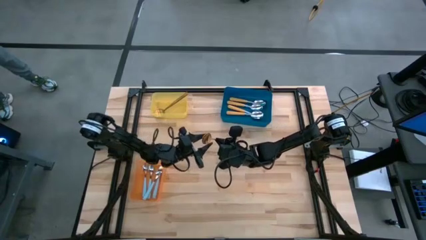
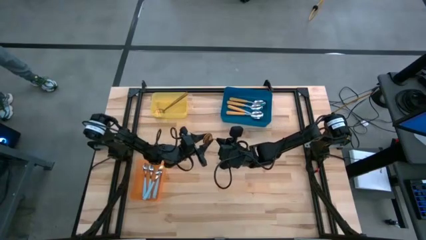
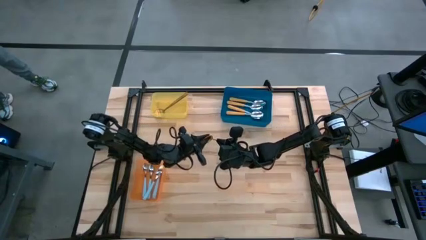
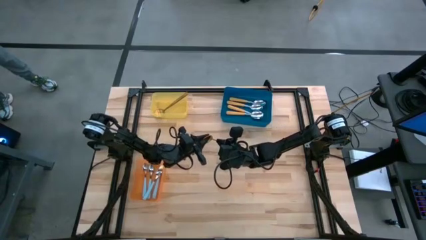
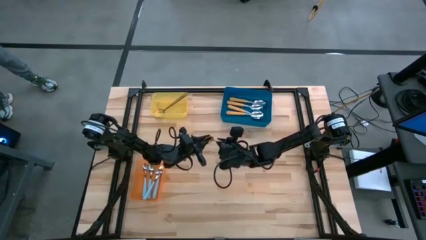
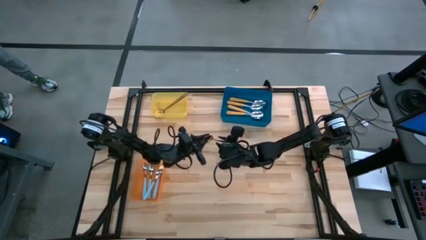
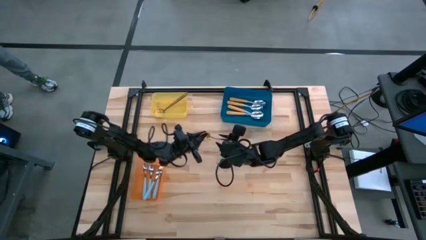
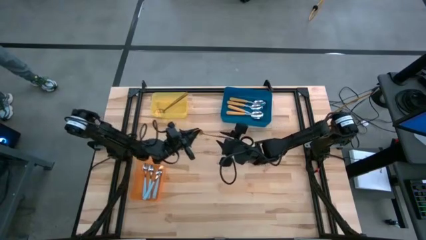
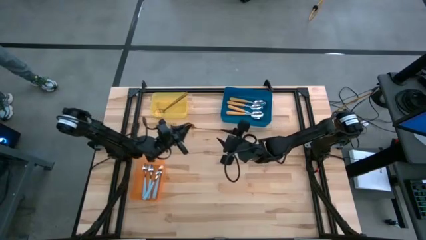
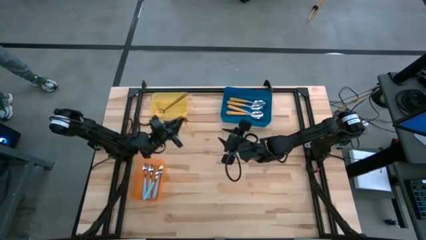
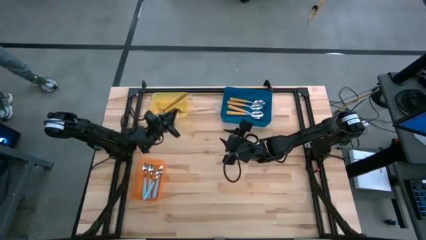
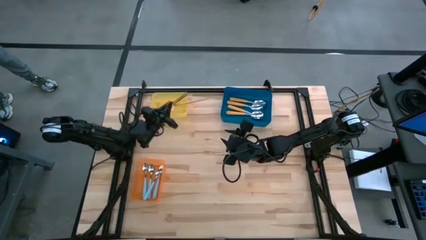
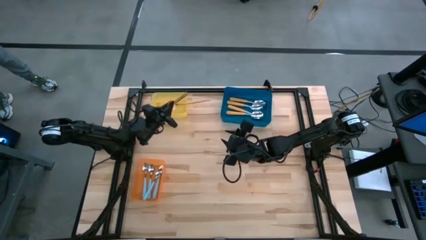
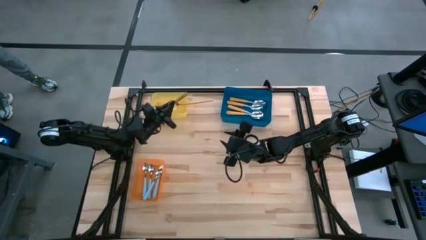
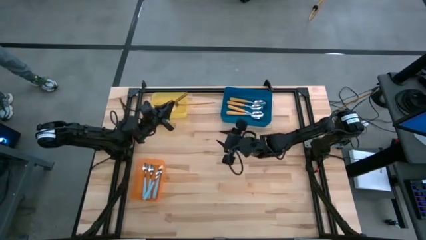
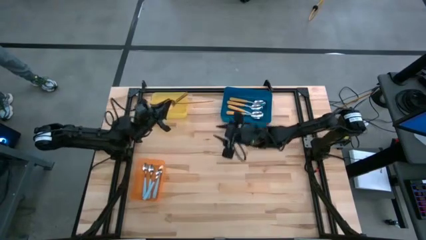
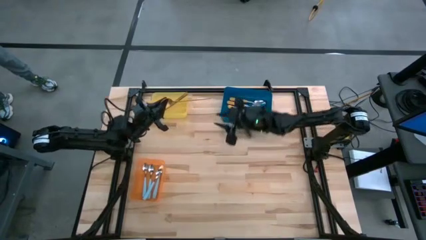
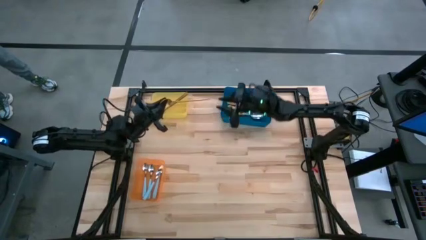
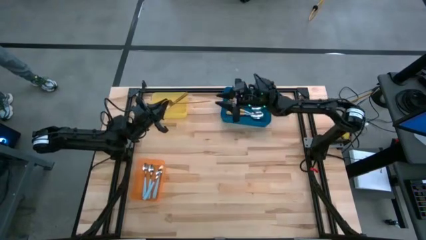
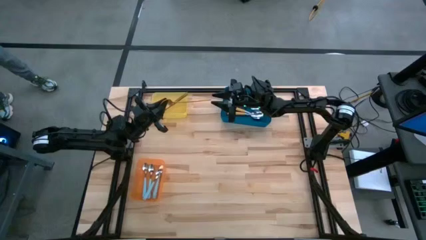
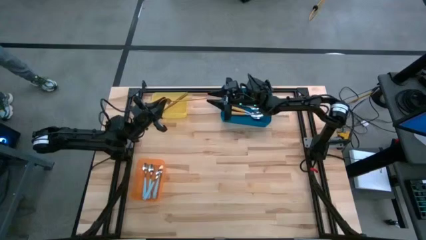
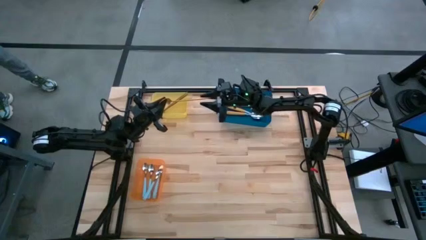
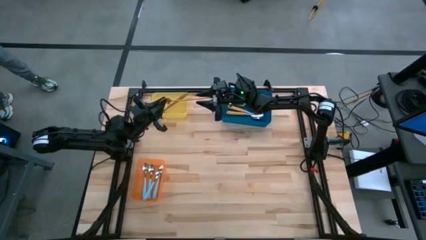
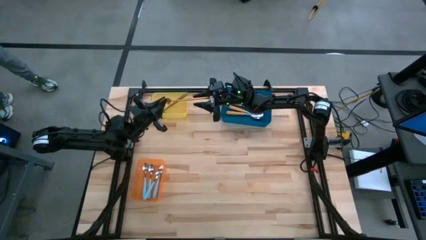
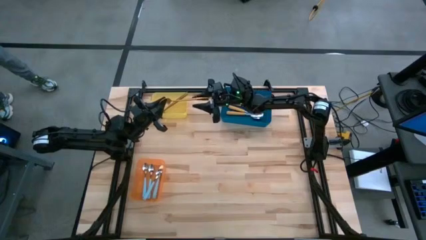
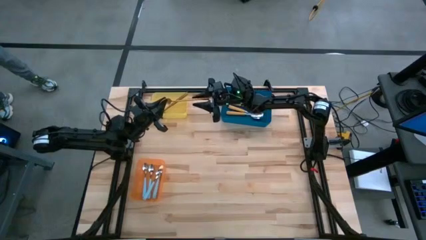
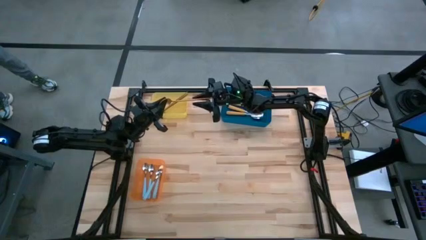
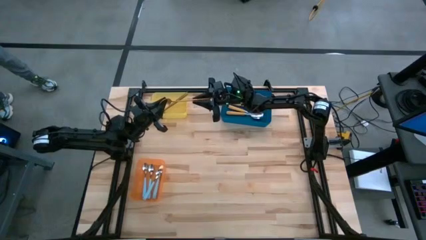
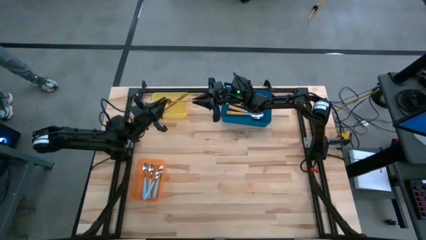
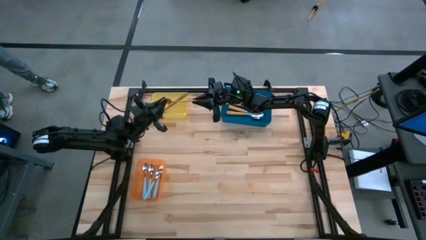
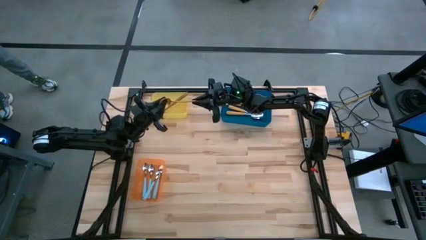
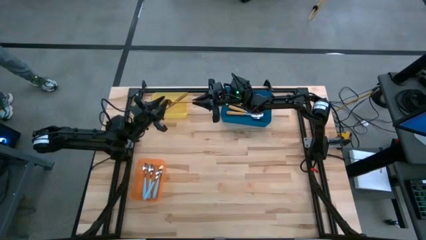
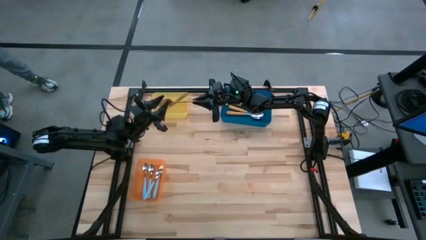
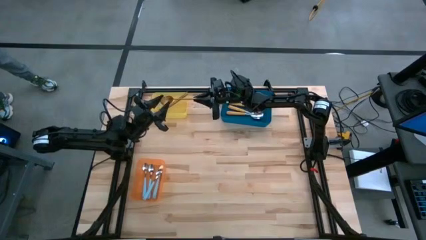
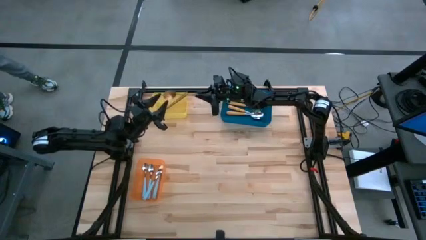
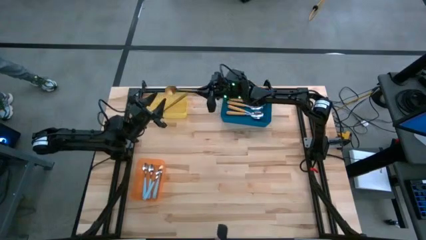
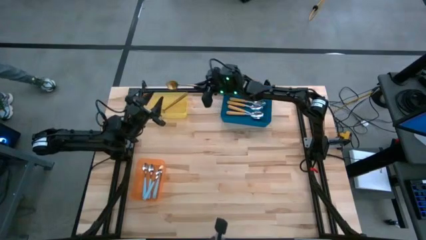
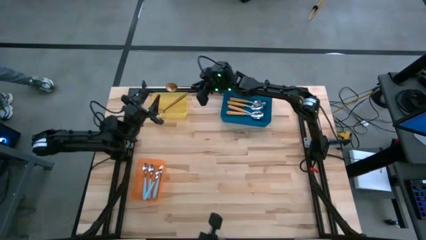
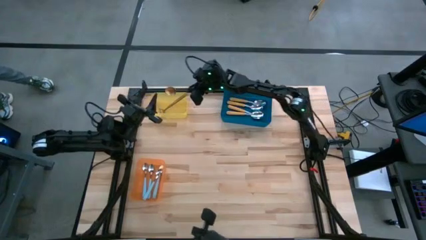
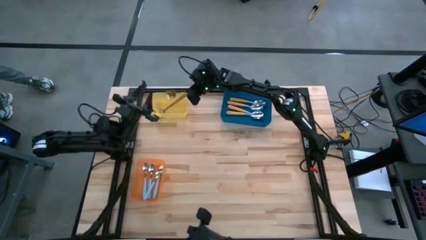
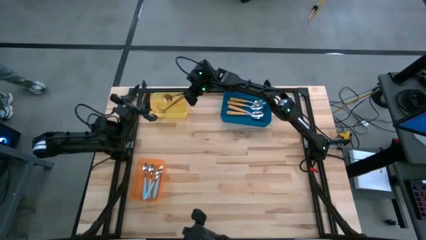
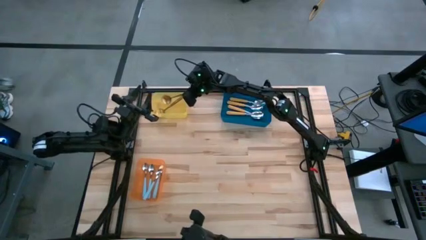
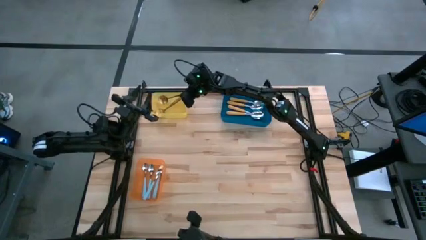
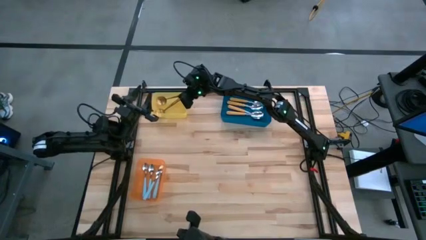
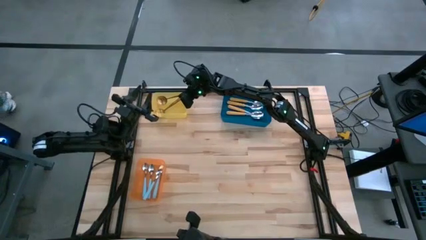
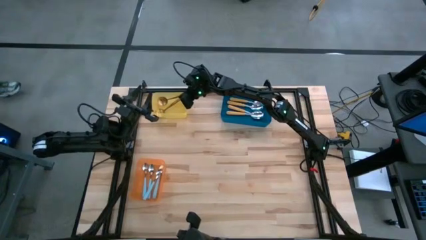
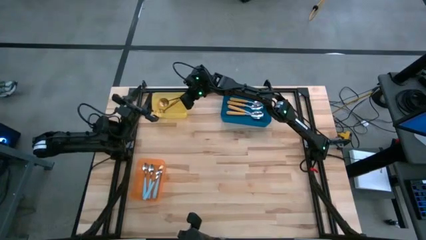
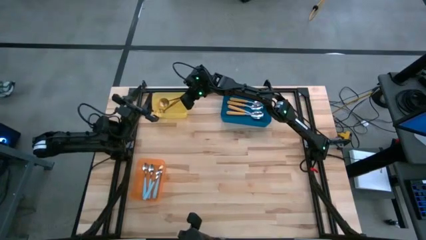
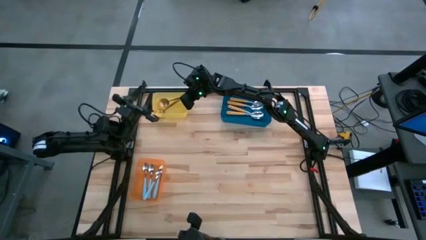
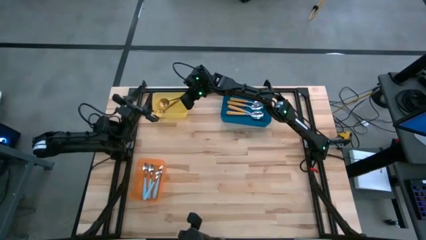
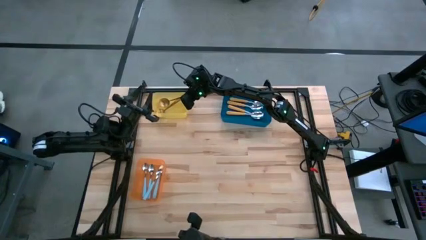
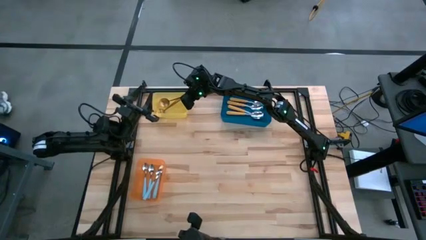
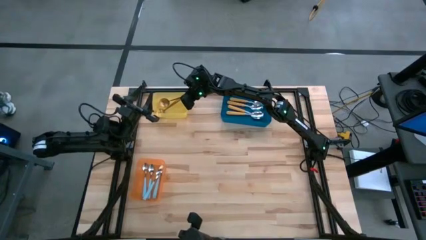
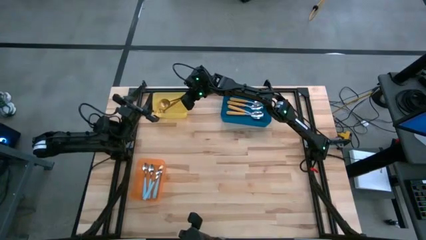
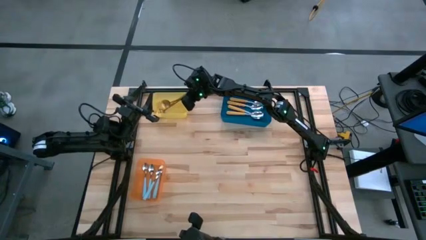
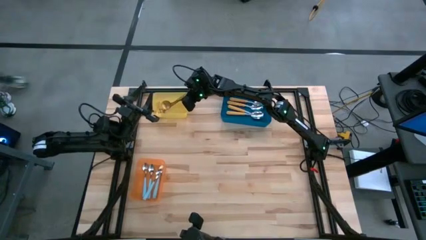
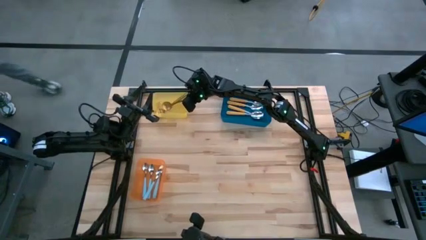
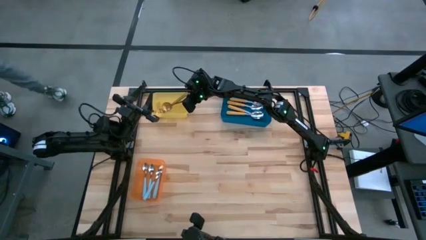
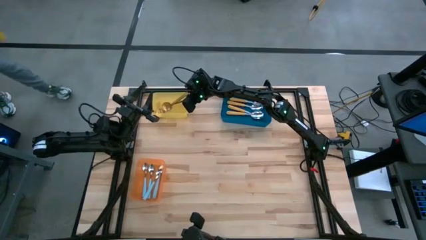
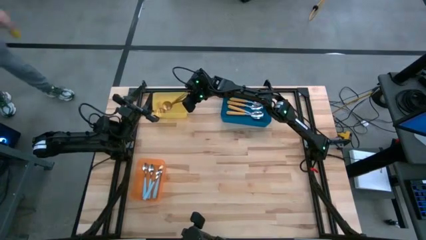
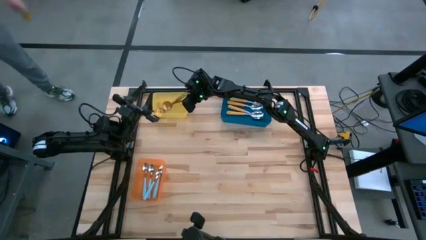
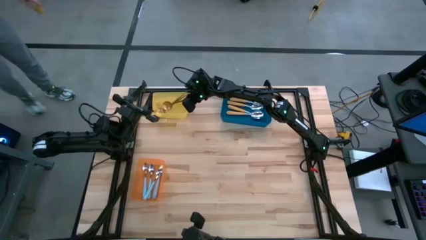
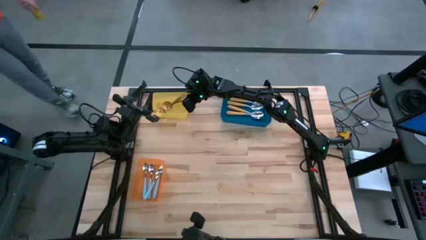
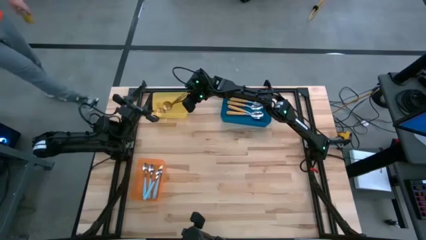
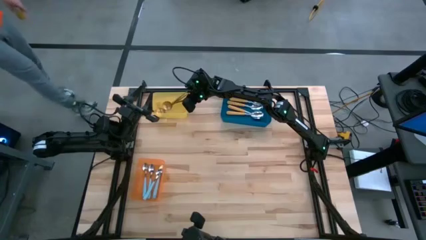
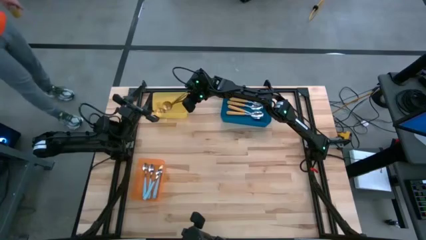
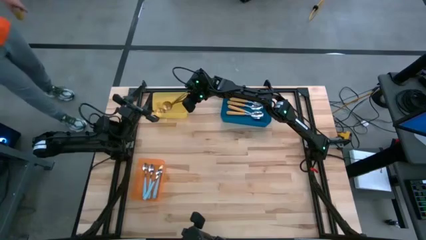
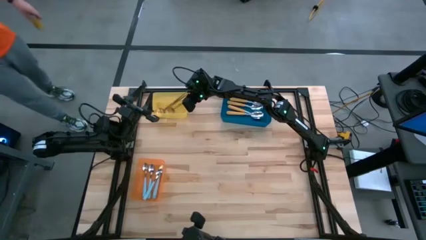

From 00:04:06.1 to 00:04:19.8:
Task: Sort silverware by color (type)
Put the gold spoon into the yellow bin

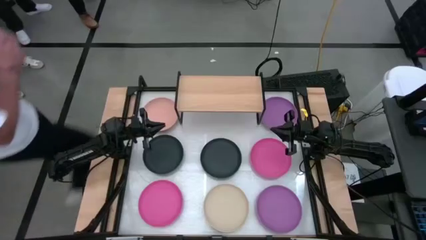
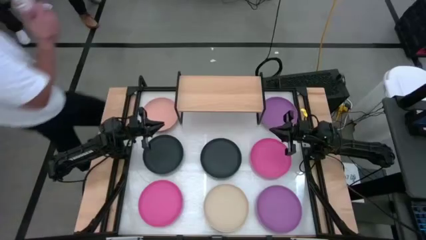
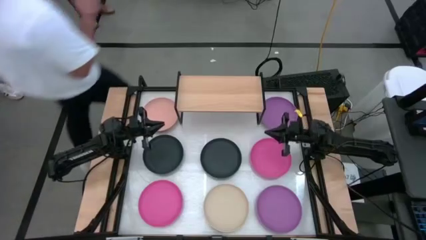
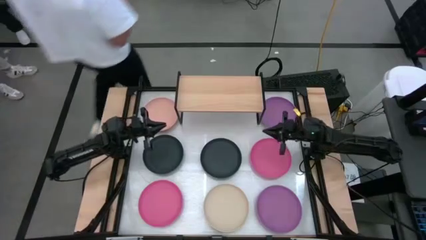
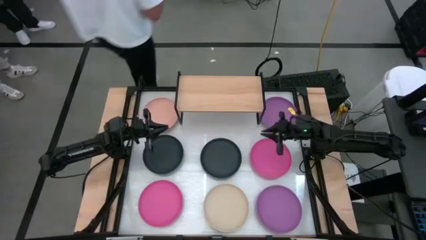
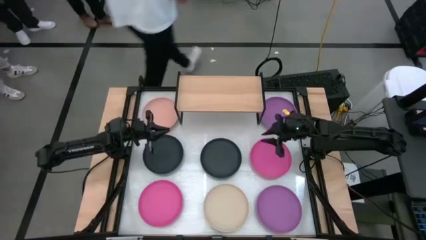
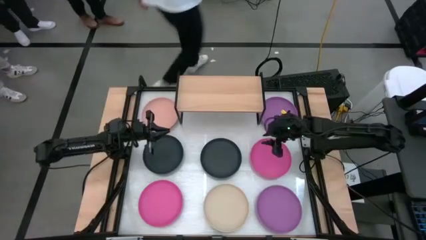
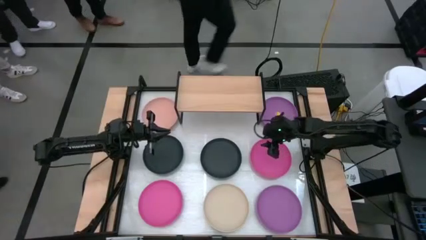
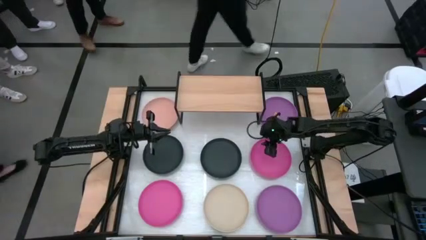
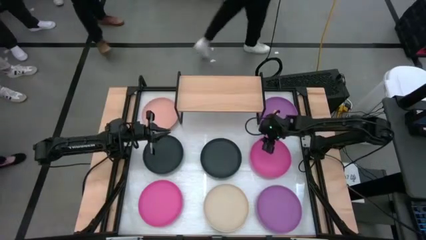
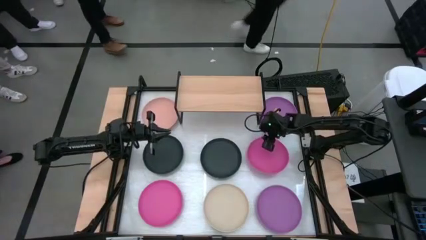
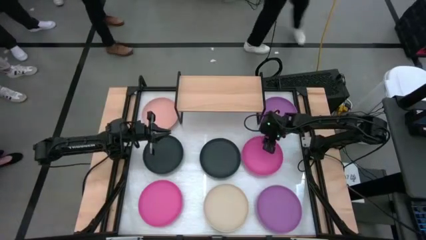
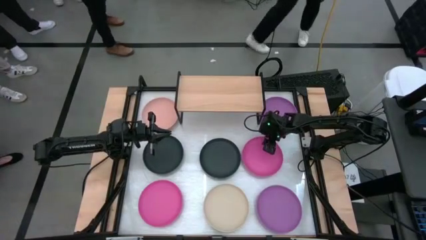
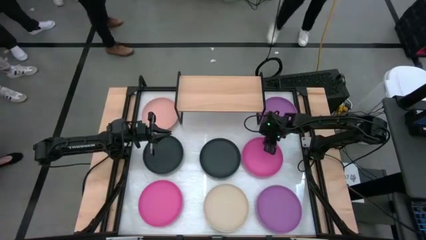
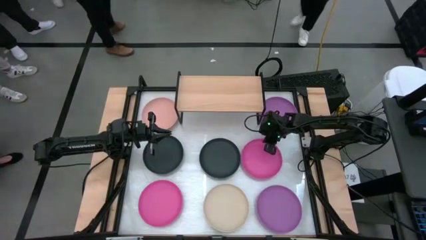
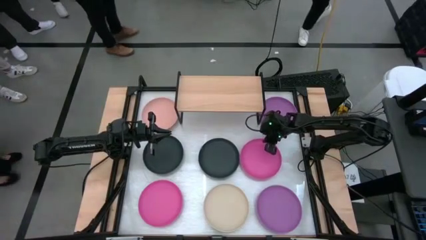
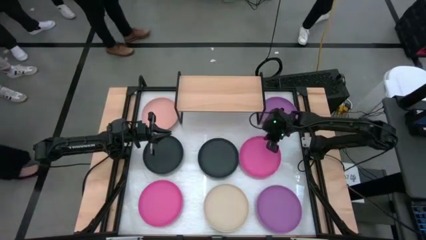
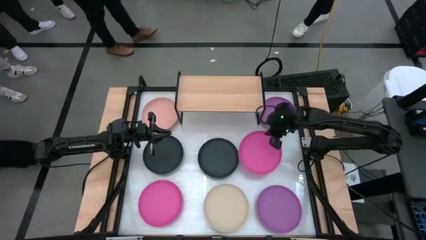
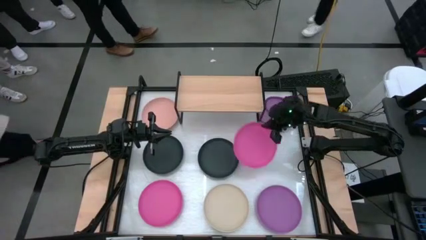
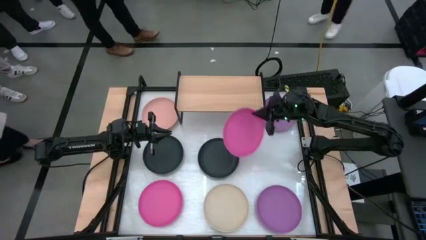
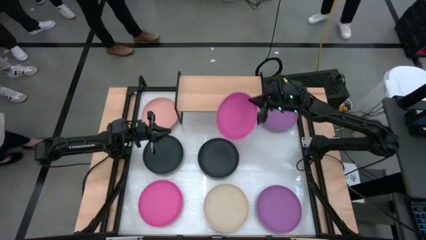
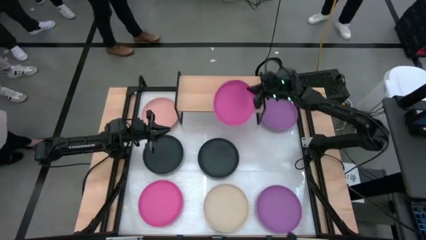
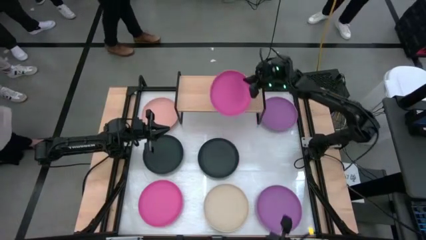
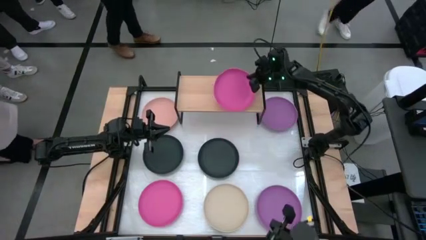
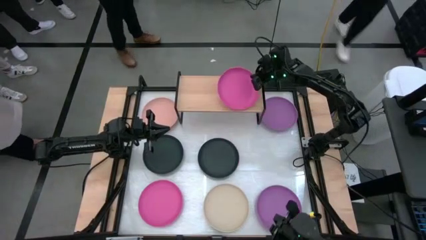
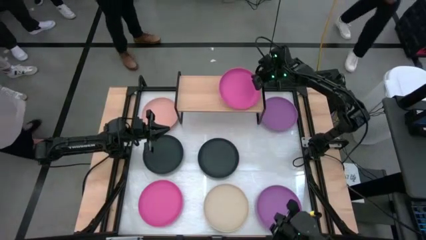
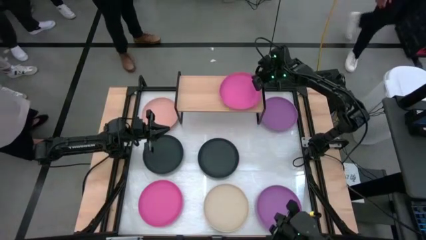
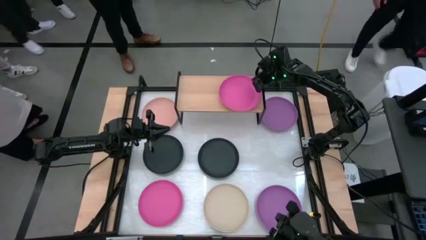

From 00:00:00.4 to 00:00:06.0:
Task: Place and stack plates onto a shelf
Put the right pink plate on the shelf
